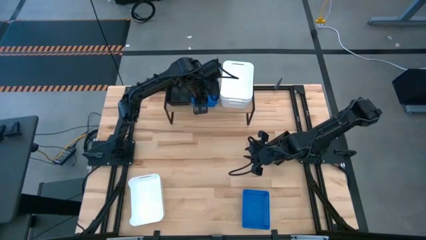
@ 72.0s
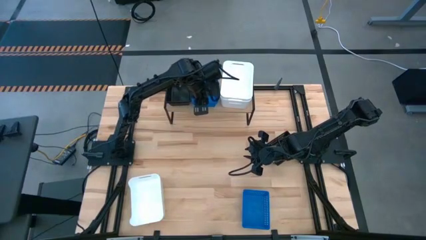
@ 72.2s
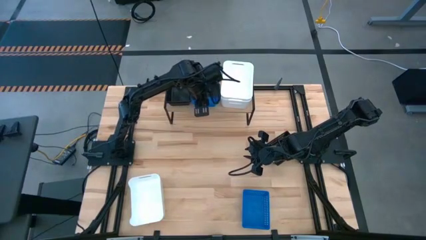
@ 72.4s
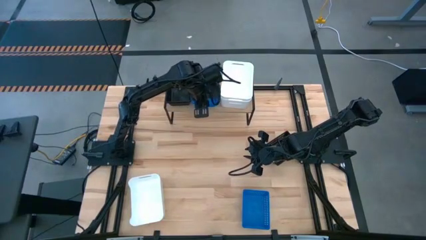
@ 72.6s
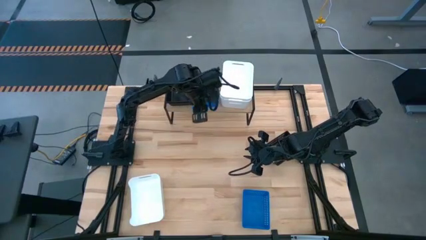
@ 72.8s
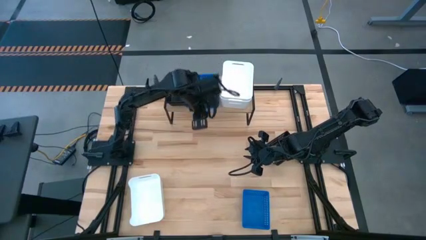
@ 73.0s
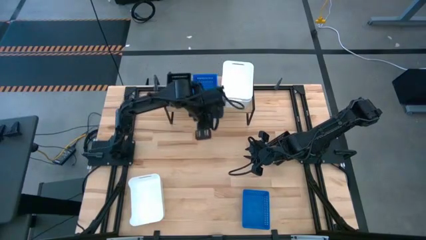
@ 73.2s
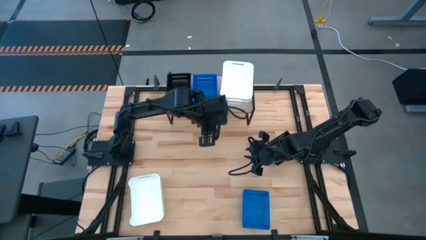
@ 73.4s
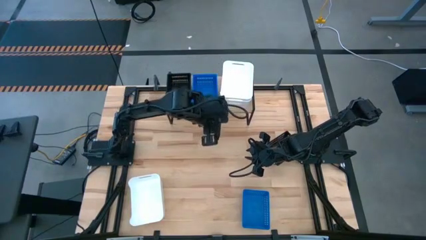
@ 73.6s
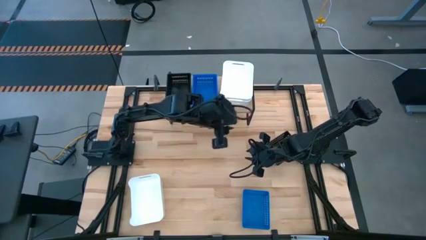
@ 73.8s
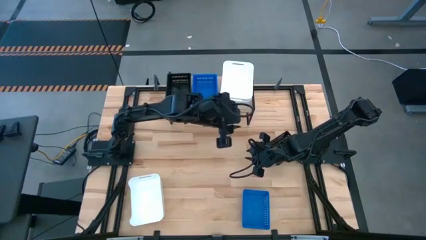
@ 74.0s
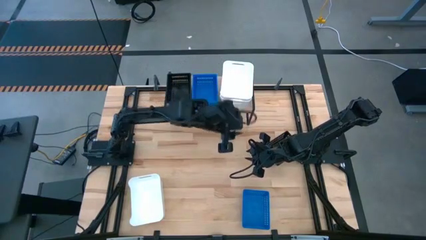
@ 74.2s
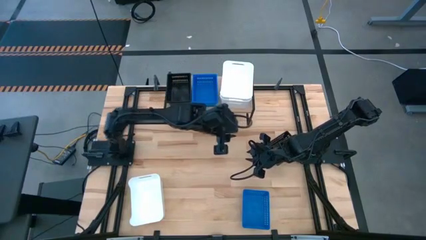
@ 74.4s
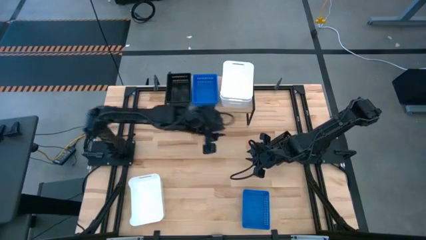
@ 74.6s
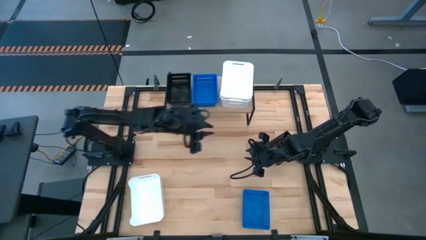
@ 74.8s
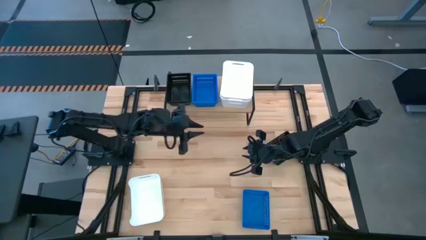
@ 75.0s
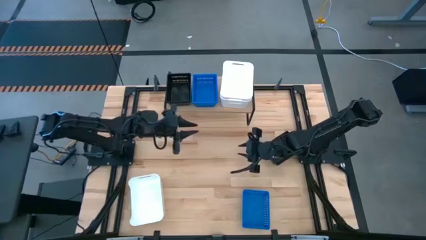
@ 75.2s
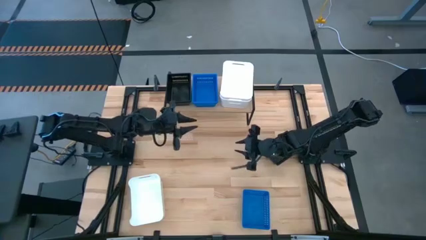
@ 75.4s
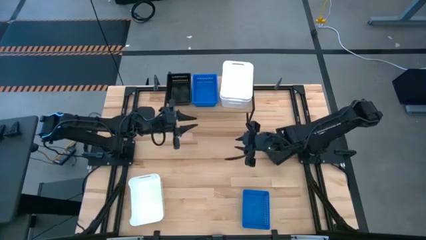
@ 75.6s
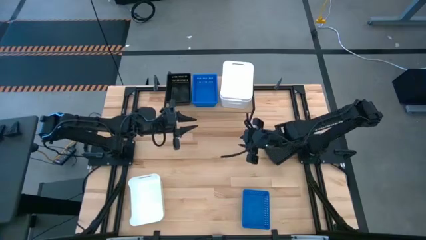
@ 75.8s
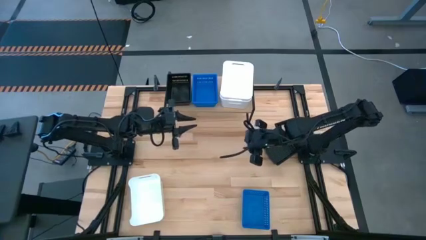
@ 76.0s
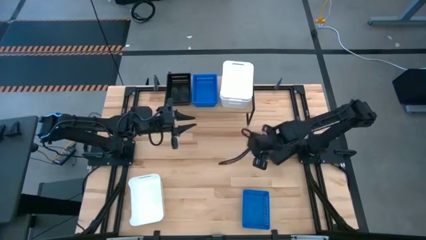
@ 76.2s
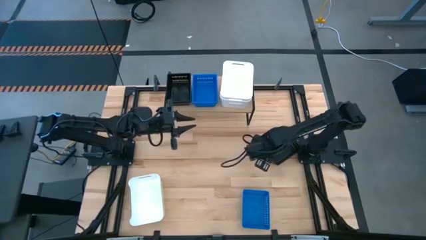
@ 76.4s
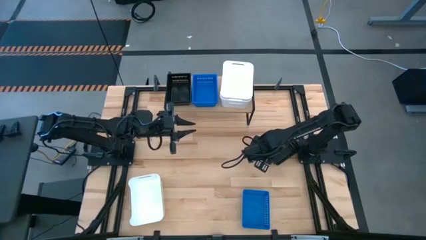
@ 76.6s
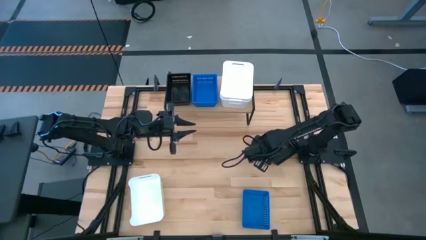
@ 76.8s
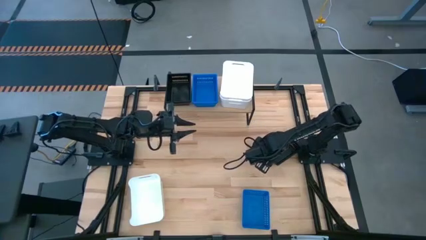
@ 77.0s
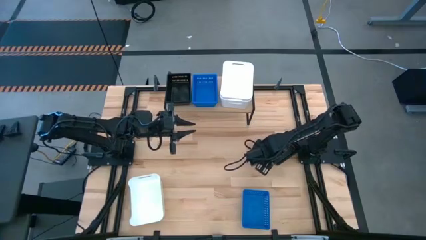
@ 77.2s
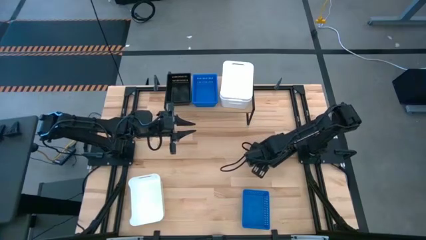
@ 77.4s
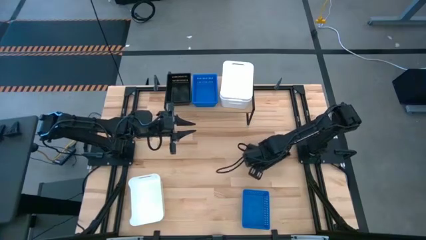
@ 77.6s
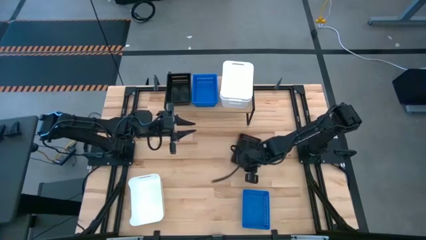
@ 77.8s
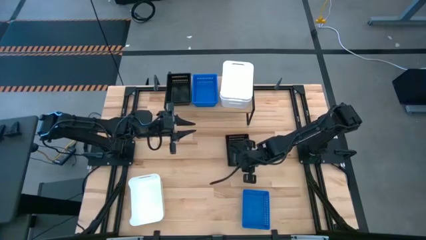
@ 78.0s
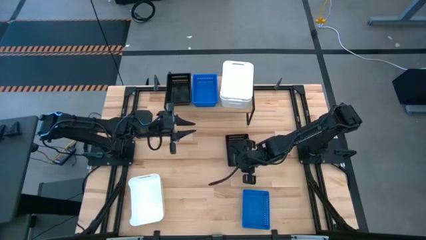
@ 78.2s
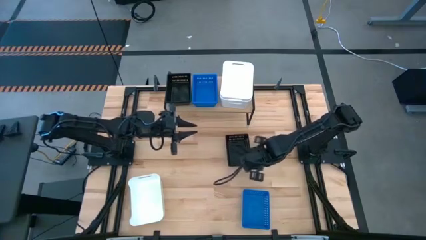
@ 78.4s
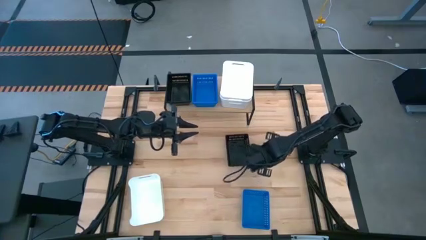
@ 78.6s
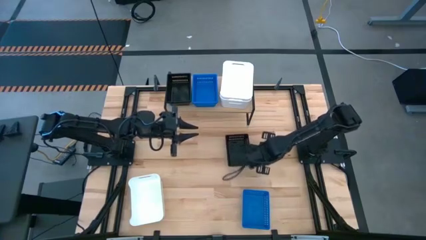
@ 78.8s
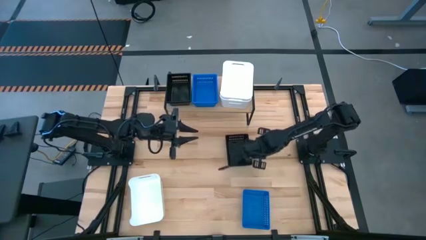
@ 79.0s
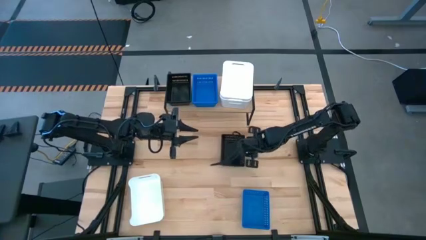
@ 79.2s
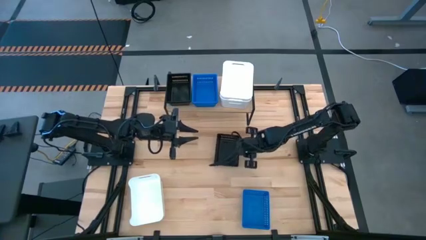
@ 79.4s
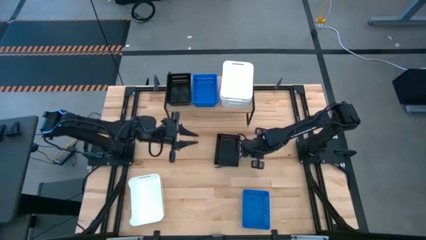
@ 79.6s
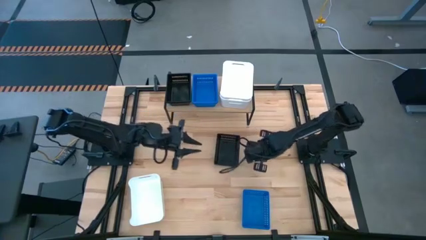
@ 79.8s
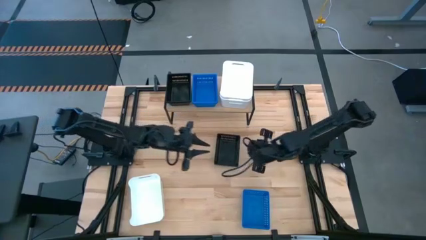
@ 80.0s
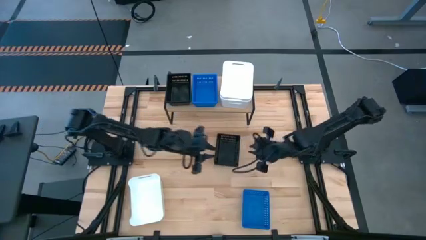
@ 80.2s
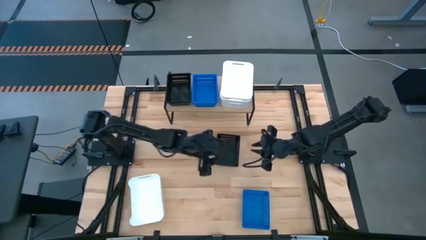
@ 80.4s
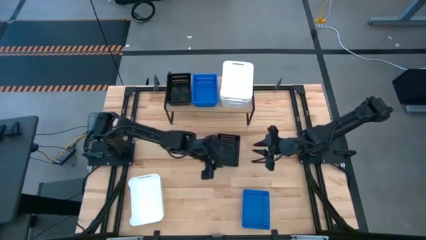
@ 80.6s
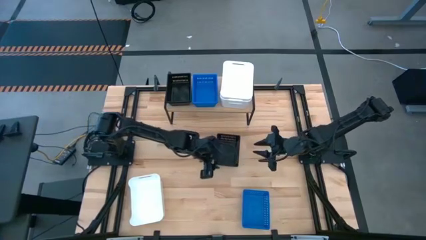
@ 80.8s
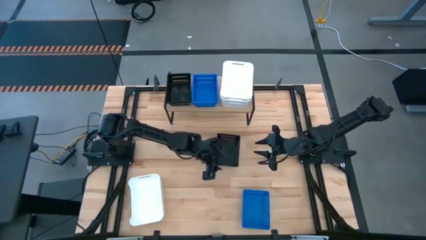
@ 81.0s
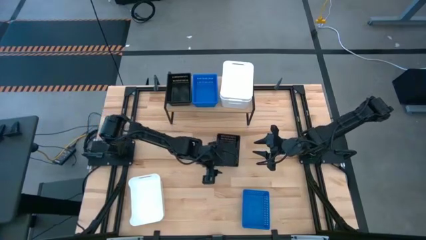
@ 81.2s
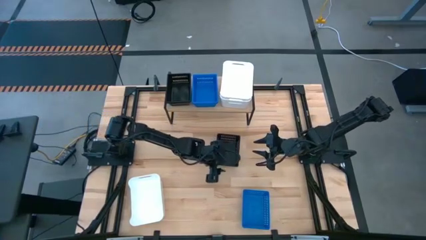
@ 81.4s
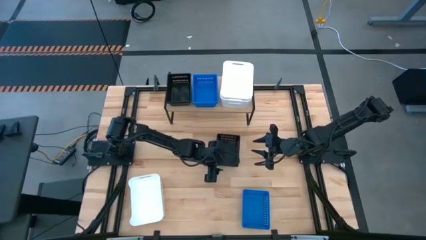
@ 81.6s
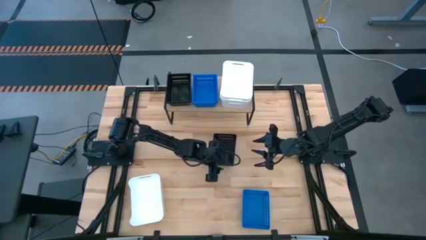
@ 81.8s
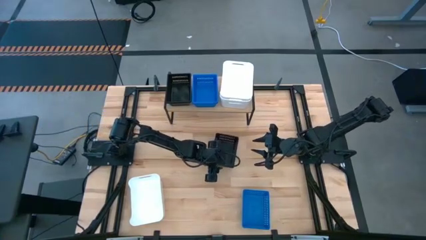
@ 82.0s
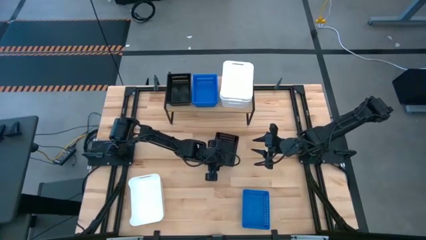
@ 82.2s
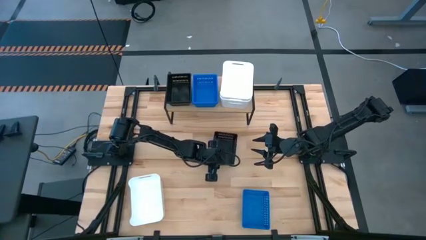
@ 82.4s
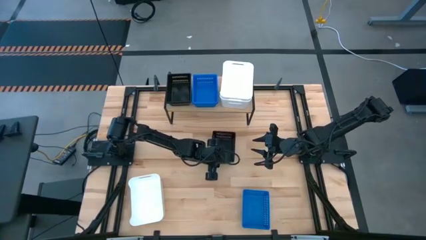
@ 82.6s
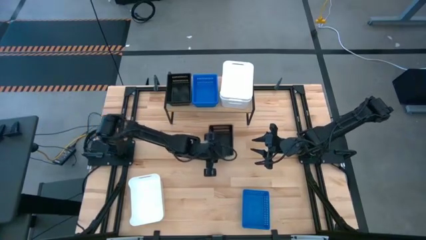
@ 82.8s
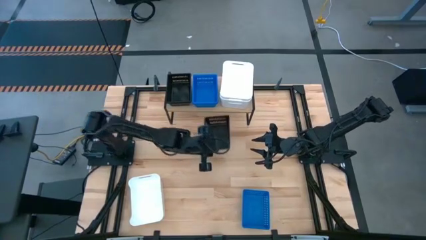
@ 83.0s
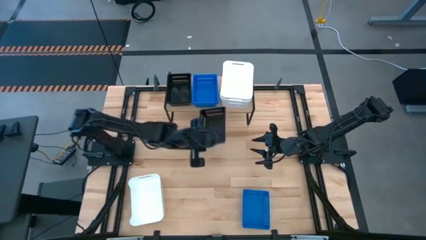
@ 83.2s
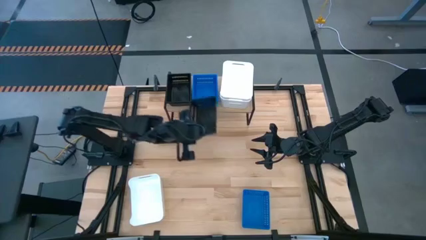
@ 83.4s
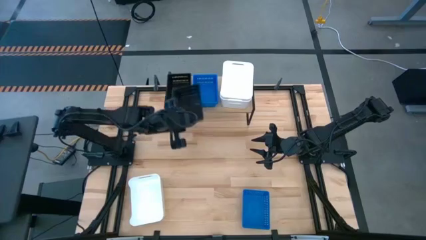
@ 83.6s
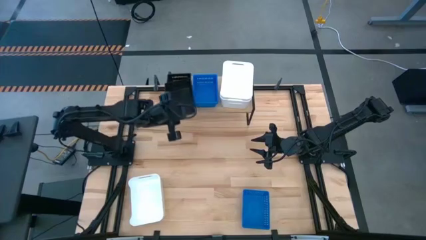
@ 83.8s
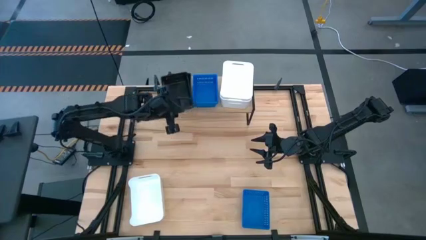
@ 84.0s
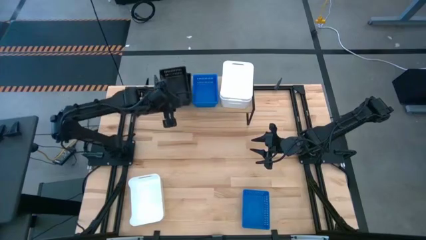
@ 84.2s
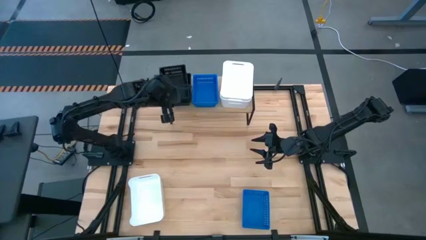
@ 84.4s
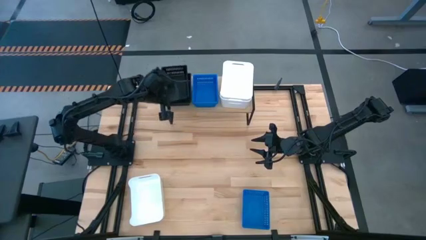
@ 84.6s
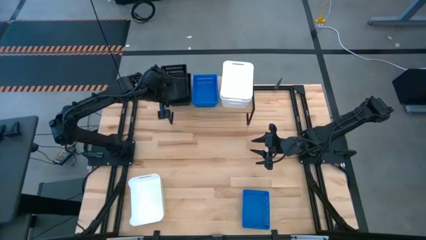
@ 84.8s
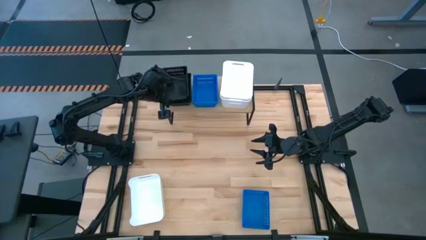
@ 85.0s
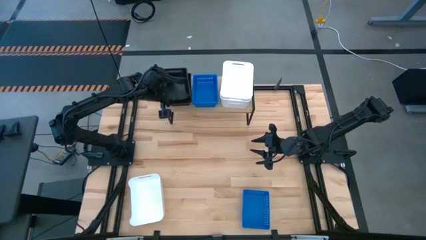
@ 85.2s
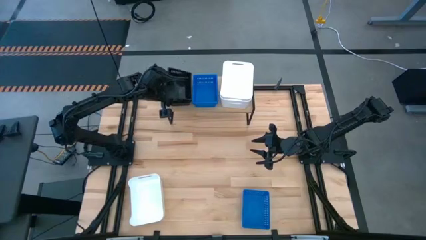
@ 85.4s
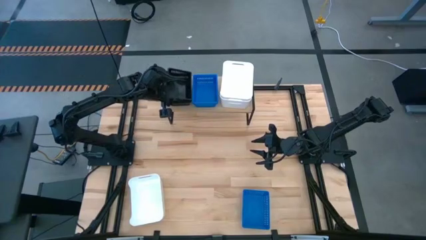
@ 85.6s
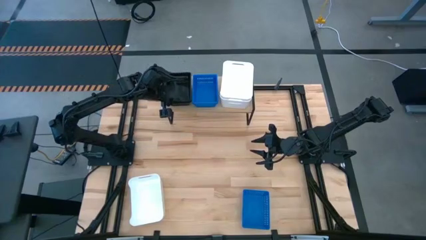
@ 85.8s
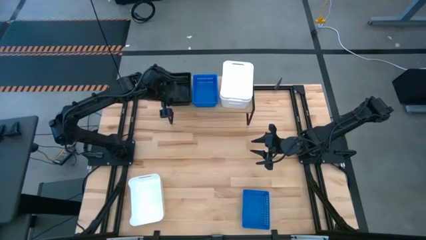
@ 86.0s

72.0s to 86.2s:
Task: Stack baskets on shelf by color
Stack the black bin on top of the other black bins on the shelf

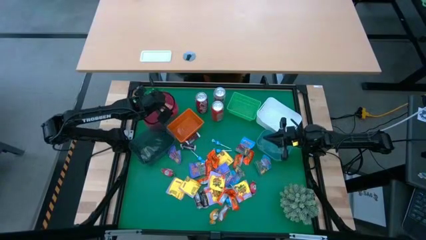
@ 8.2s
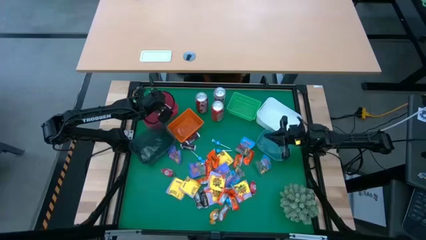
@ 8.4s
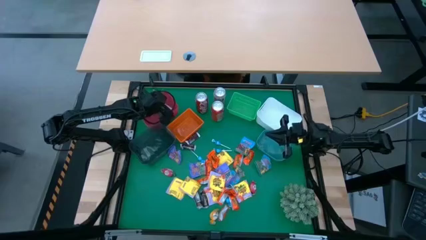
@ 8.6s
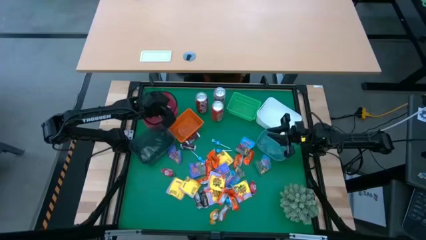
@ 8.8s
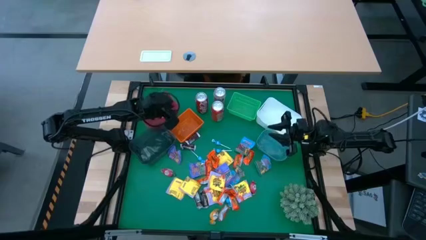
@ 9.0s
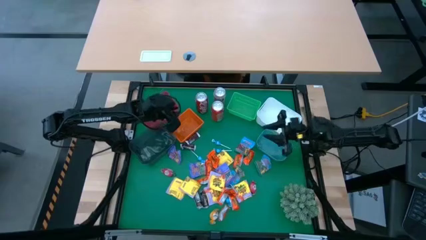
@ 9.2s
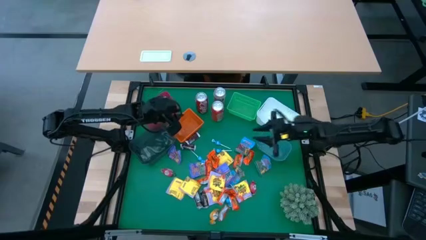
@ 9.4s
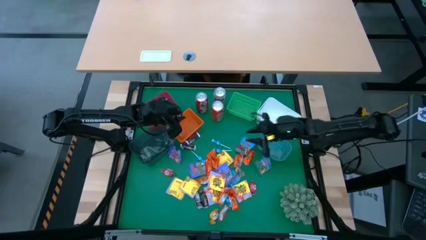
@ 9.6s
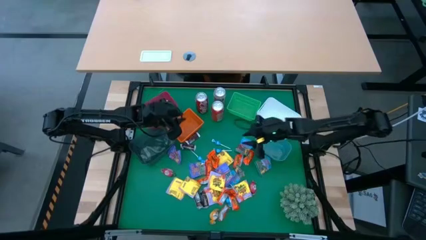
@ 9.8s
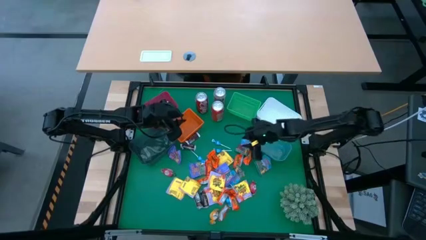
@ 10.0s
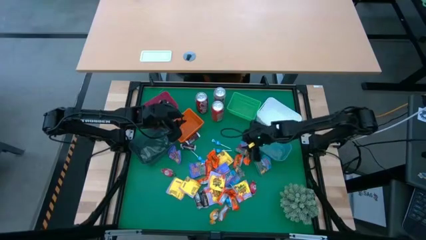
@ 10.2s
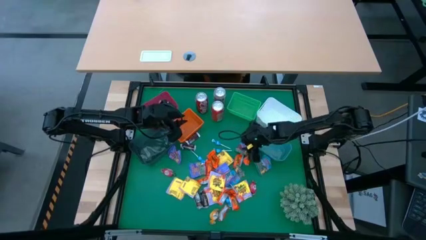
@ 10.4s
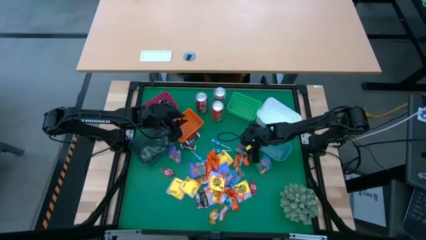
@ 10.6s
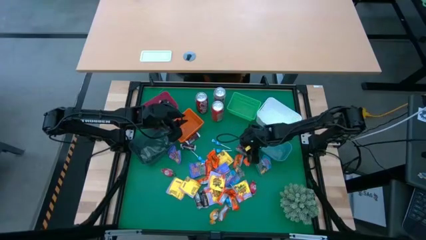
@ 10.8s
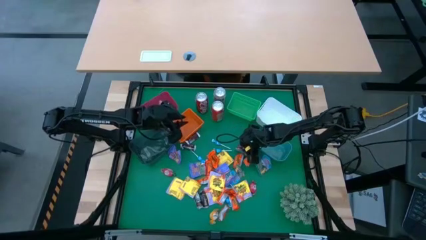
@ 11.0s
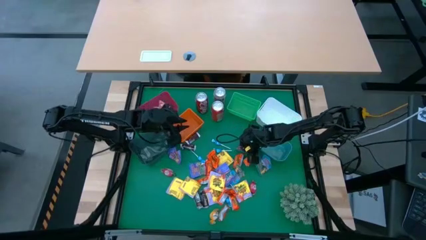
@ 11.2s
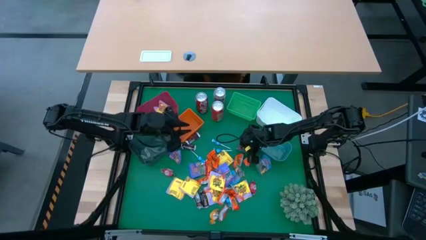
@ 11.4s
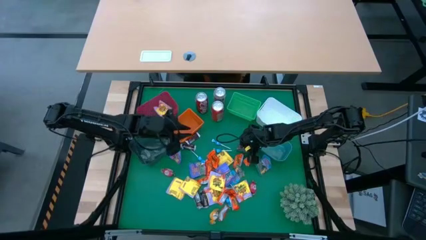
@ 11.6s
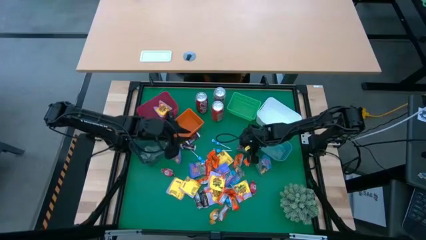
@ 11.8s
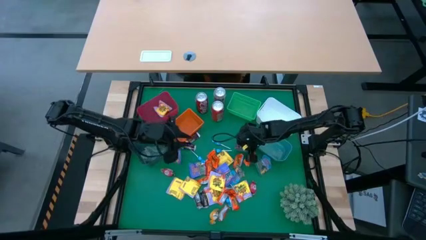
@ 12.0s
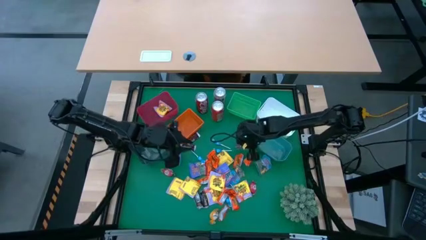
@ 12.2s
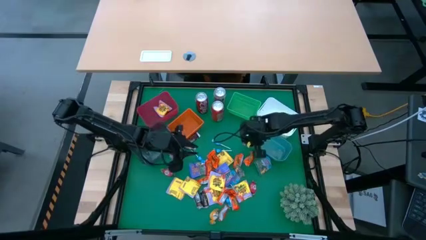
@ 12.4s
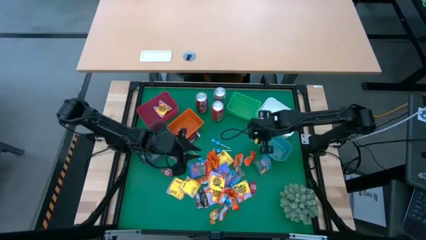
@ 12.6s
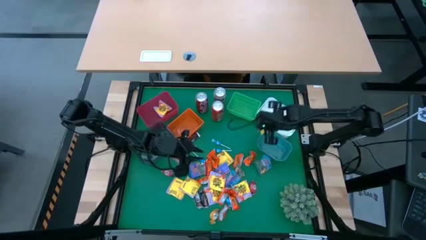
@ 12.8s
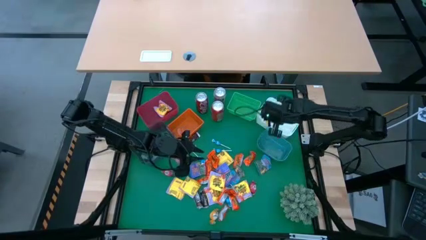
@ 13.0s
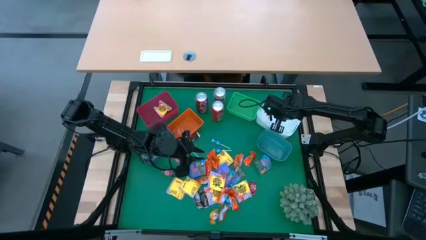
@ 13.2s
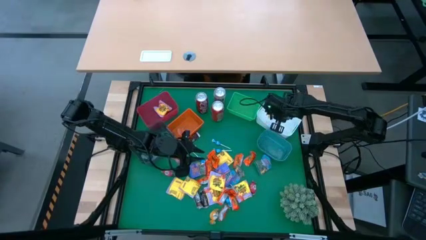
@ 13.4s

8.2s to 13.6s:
Task: Sort candy
Put the blue gummy into the white bin
